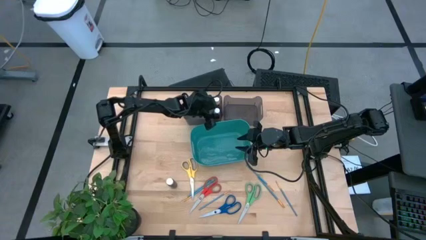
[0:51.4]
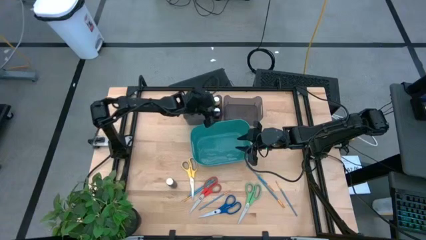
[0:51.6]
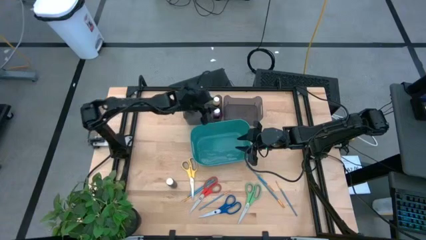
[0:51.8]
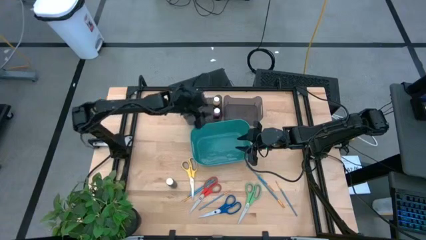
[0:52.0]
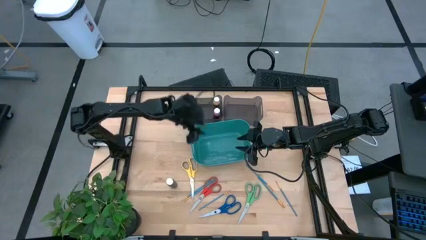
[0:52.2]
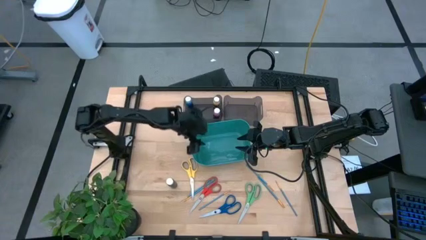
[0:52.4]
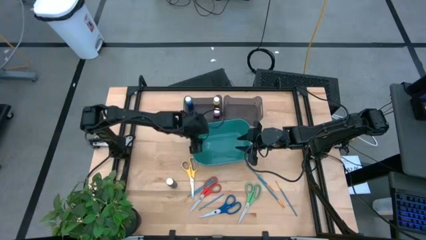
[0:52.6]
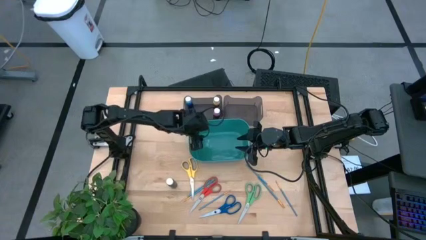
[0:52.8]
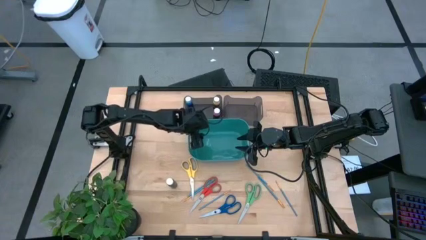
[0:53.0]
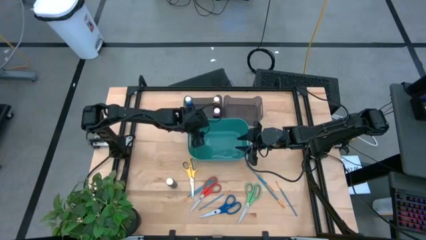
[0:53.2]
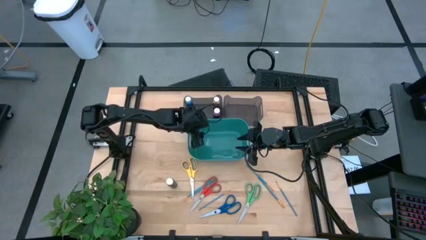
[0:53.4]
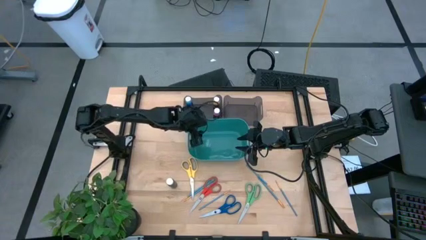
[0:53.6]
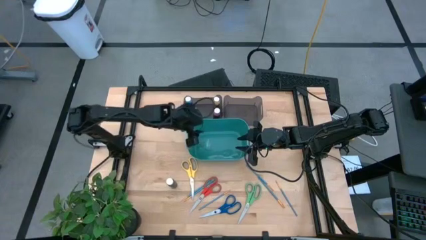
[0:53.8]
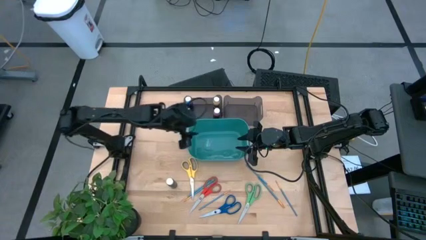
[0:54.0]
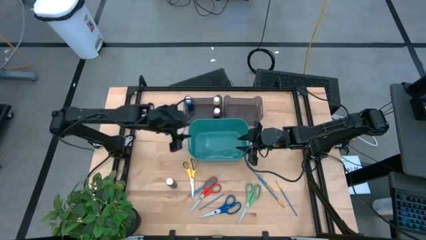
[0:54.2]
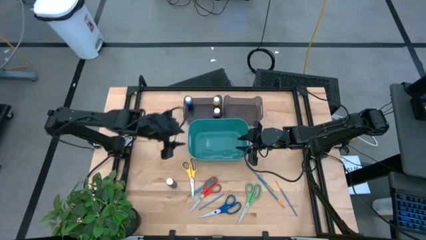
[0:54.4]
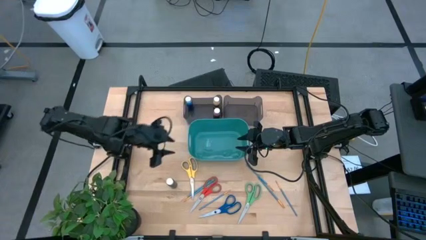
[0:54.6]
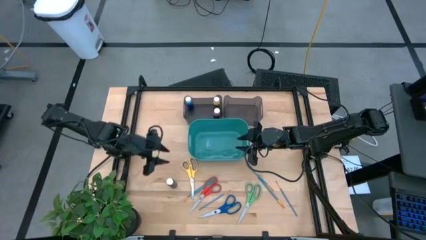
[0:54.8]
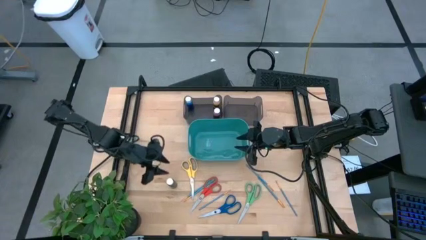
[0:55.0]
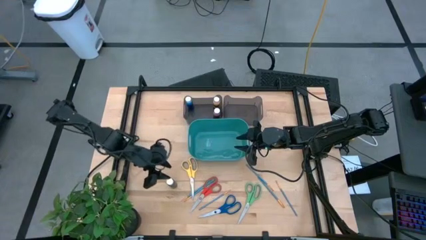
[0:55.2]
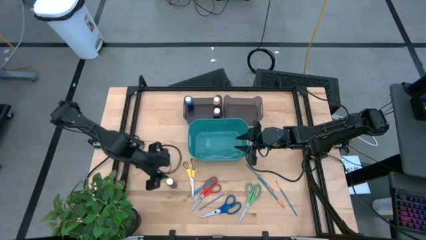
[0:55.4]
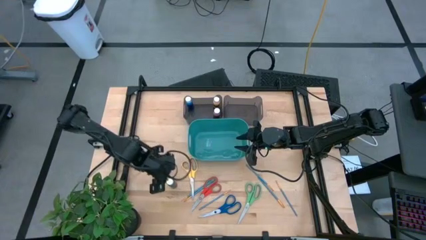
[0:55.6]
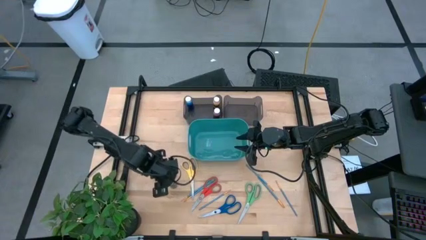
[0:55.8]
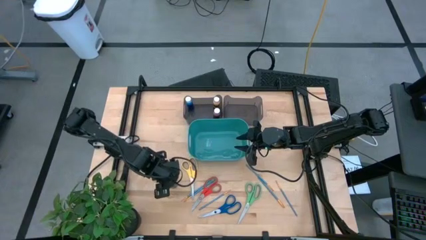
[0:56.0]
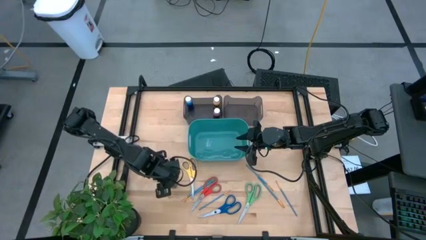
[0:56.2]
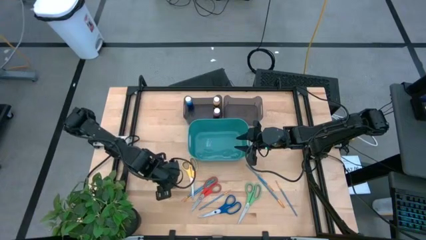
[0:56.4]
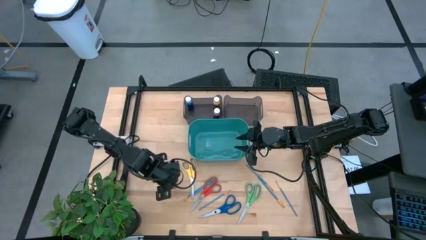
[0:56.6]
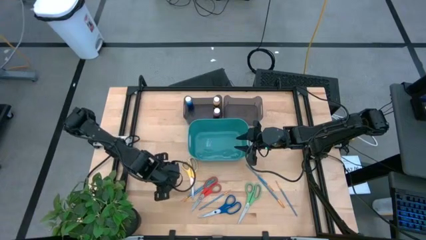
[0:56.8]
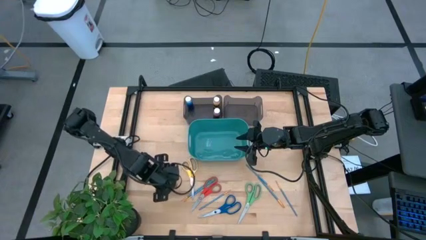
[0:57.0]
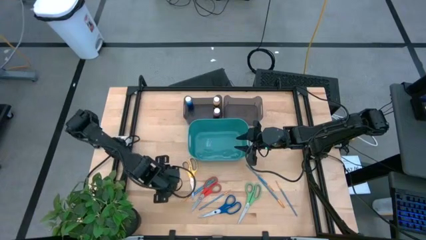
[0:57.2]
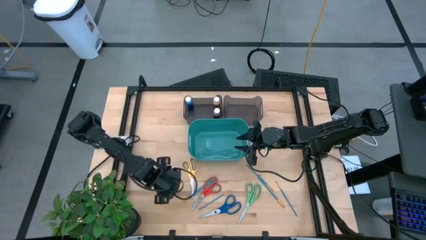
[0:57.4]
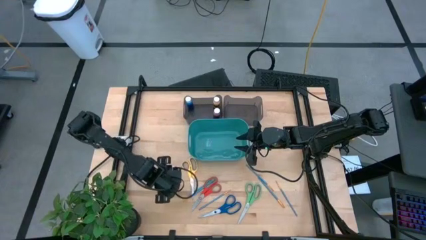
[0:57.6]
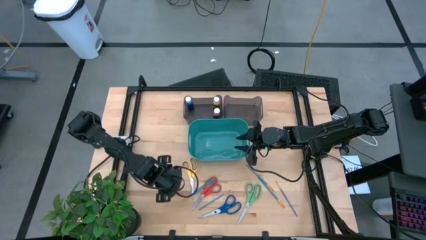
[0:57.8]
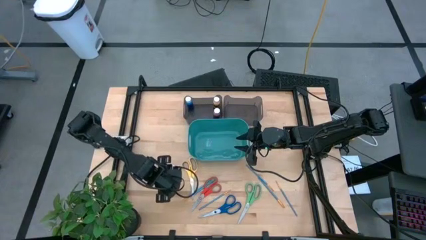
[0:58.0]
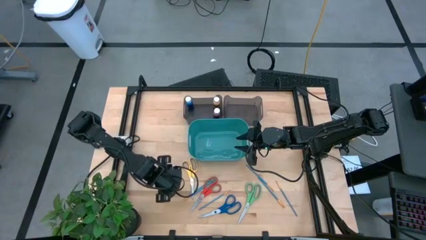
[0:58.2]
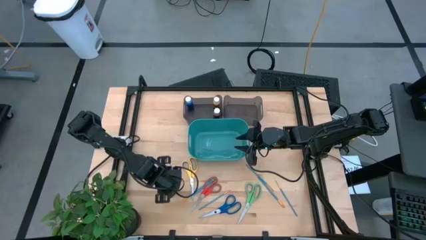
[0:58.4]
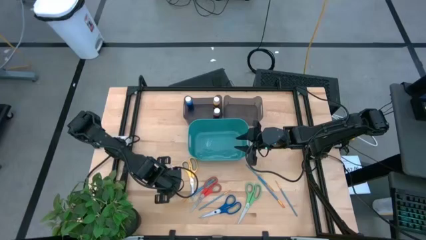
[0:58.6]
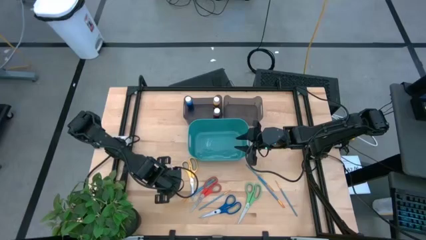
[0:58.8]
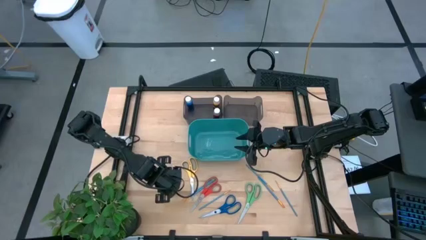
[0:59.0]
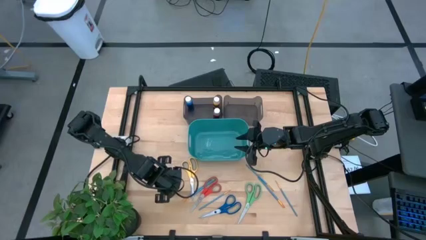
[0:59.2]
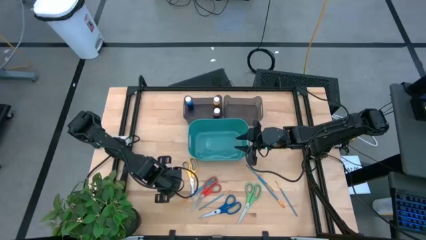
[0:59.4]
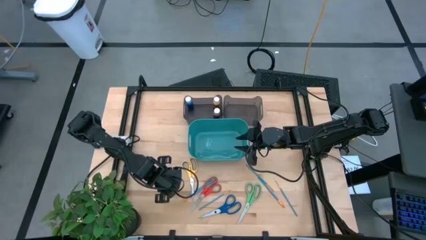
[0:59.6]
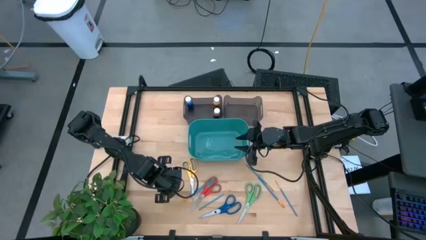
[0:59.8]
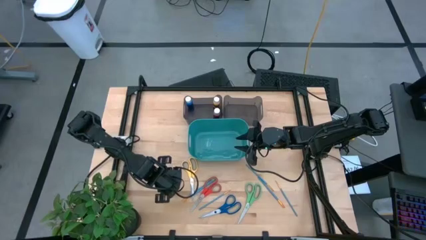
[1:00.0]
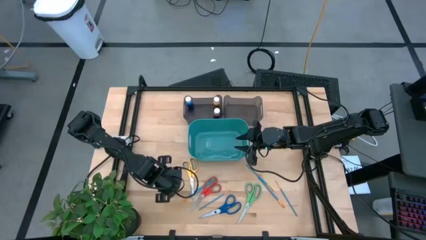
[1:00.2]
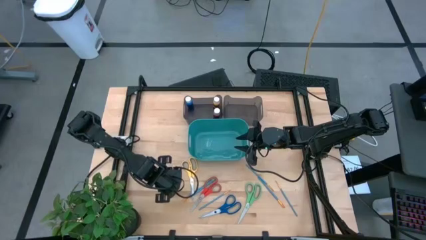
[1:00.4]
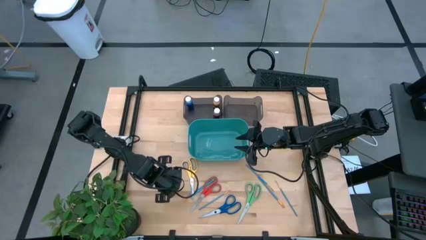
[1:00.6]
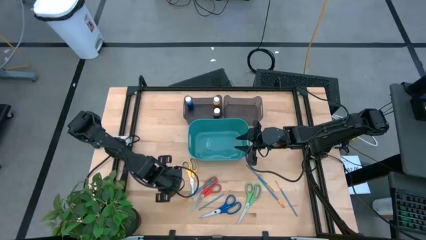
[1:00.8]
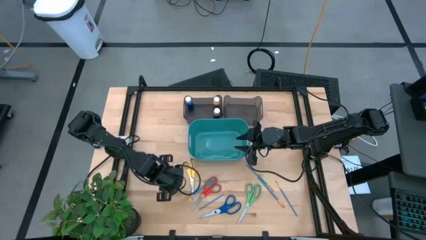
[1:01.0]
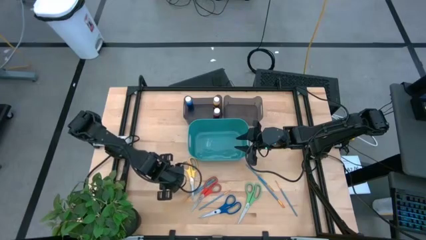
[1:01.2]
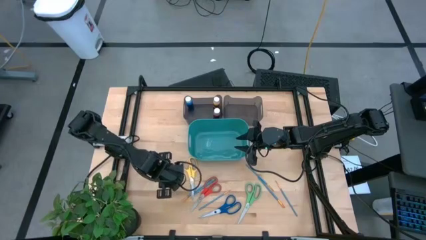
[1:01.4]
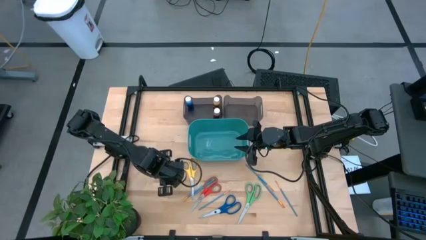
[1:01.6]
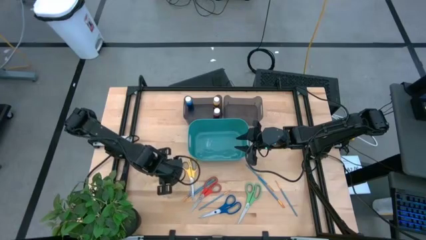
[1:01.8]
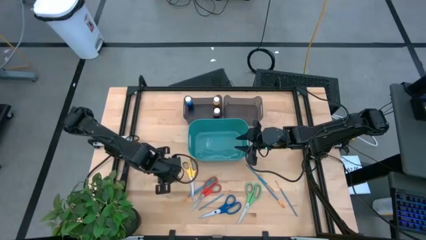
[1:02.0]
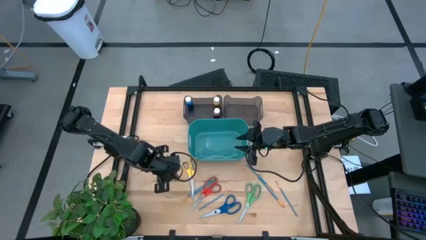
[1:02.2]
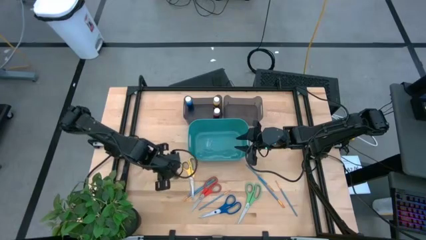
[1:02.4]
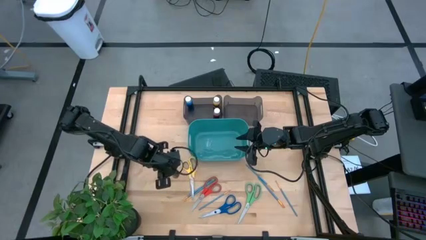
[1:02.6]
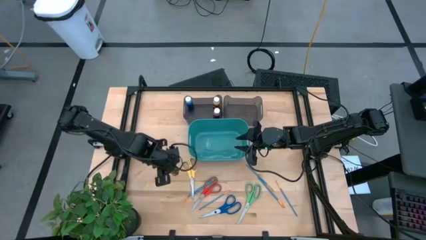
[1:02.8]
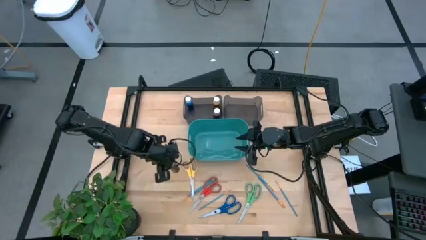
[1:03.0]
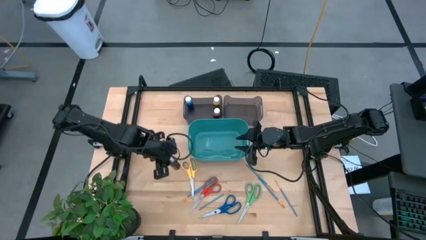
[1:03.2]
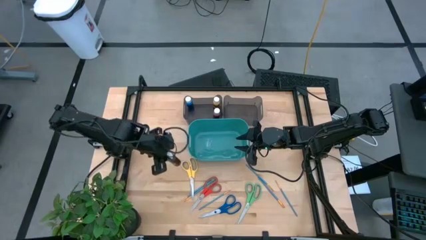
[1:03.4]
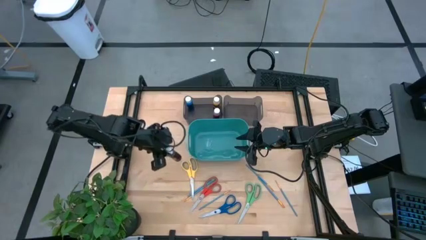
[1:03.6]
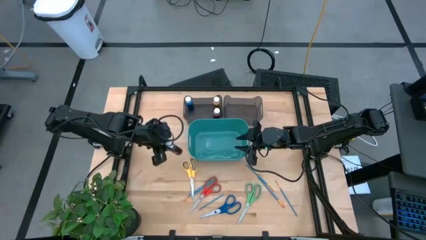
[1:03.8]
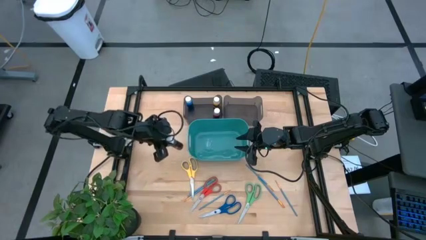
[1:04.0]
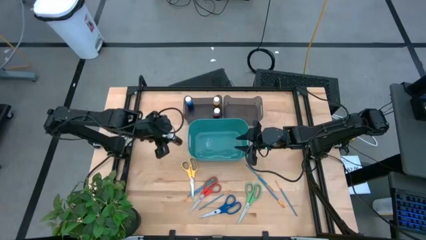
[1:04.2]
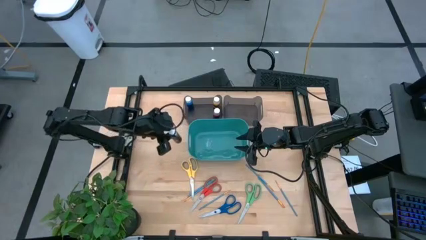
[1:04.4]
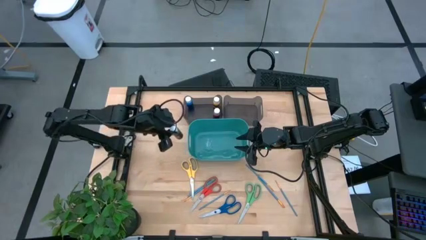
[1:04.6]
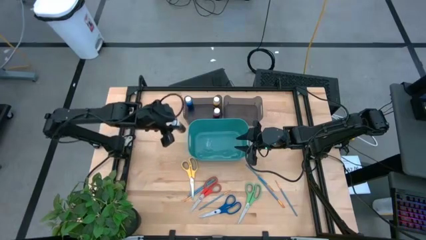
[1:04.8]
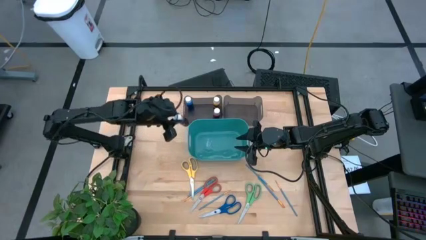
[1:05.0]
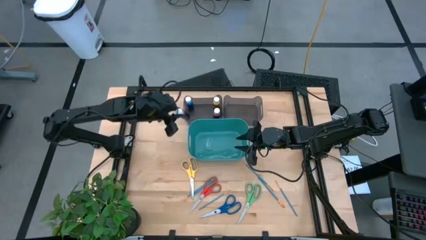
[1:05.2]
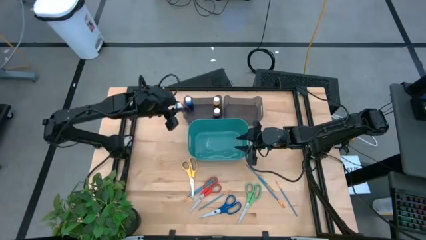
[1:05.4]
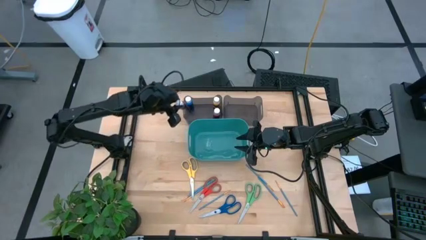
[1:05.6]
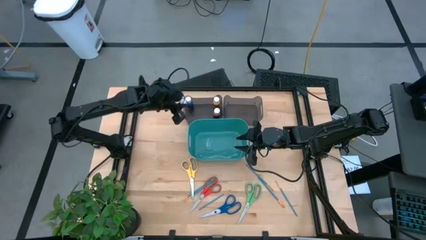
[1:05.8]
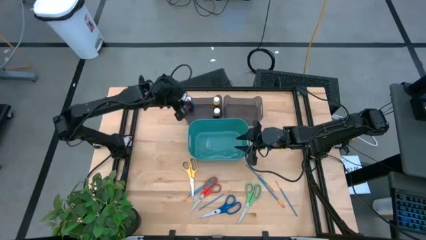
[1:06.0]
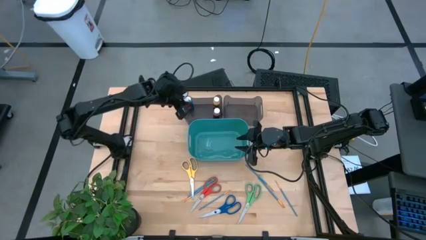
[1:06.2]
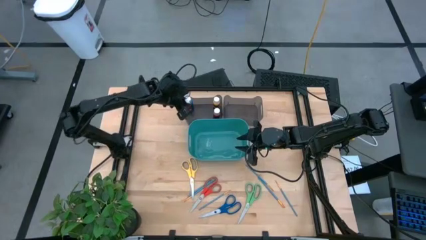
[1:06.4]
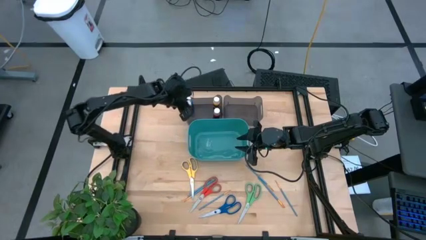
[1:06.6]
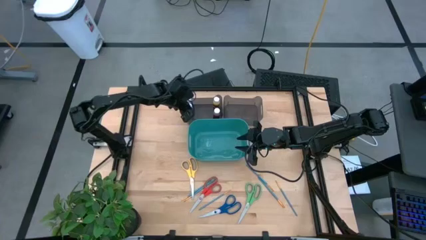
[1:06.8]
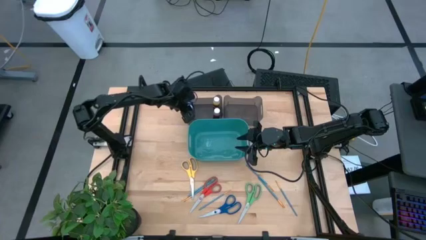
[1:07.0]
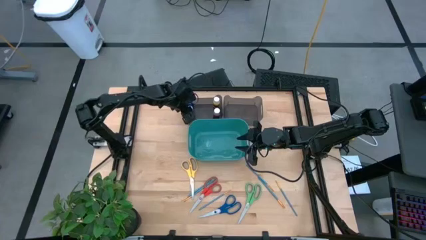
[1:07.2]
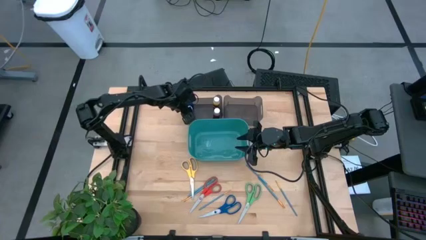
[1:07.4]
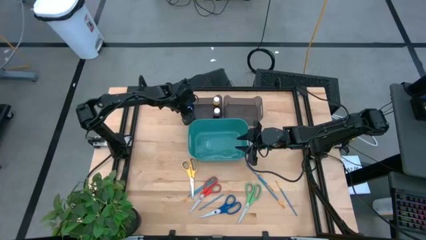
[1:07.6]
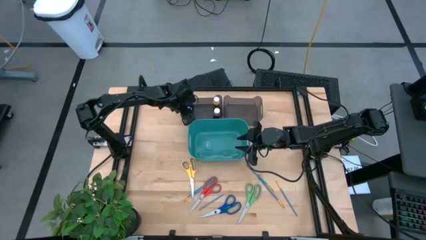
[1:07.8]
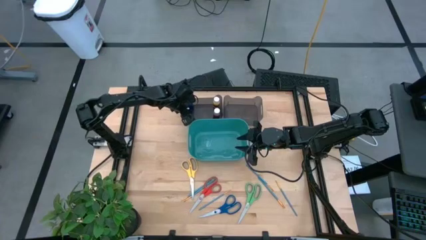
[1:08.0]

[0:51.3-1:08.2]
Task: Pick & Place Paint Supplies
Put the brown paint bottle into the left black bin
